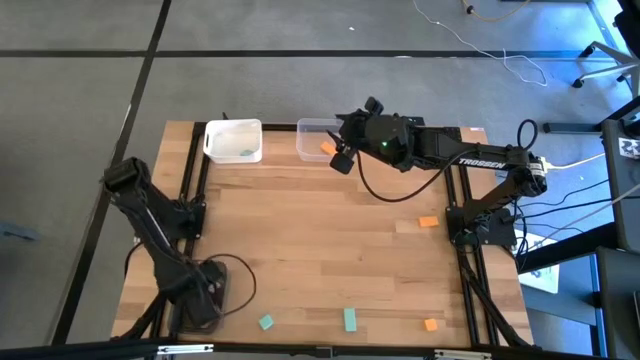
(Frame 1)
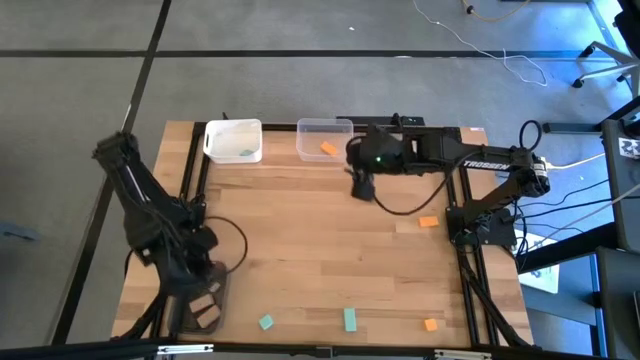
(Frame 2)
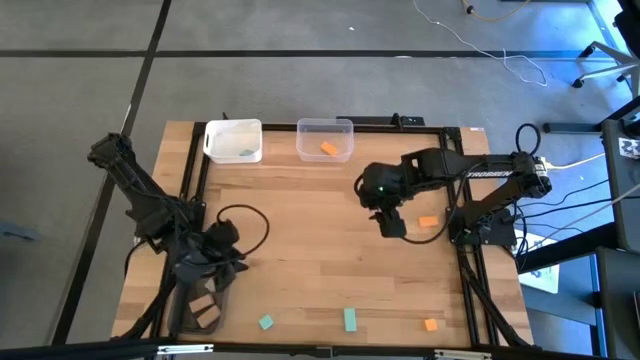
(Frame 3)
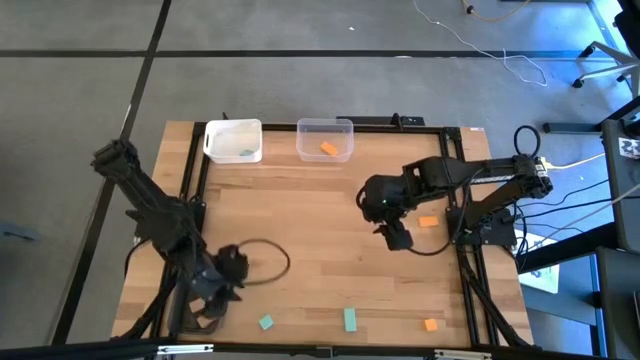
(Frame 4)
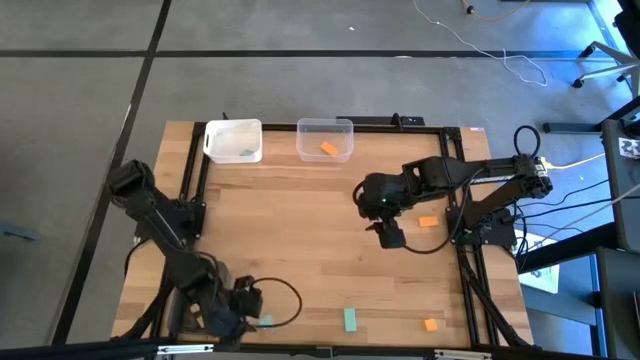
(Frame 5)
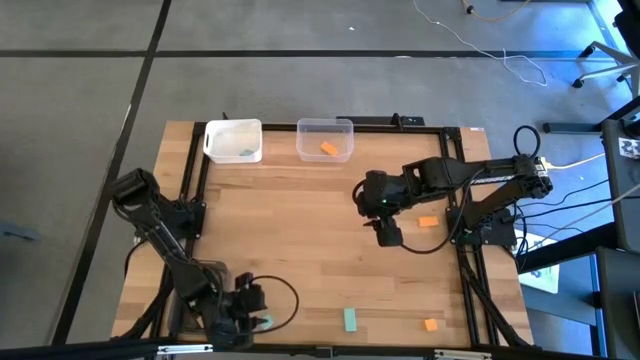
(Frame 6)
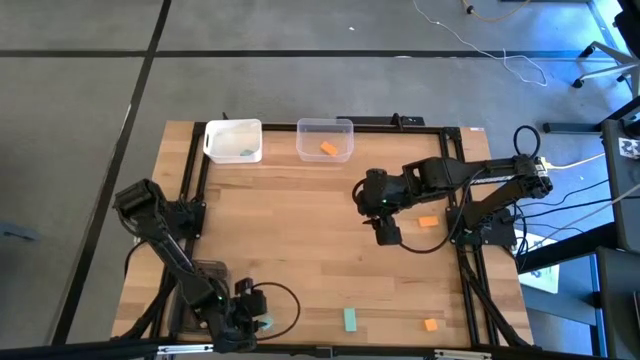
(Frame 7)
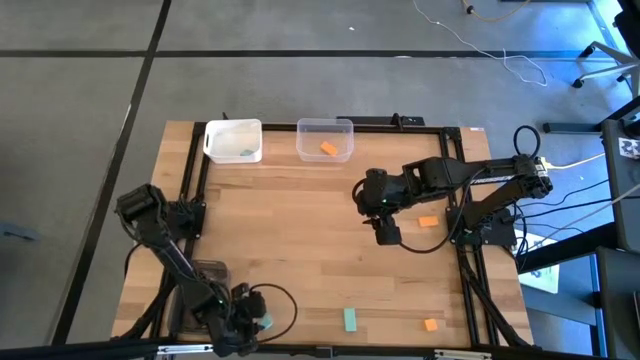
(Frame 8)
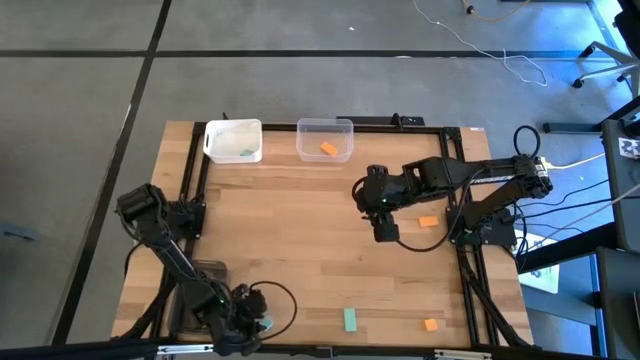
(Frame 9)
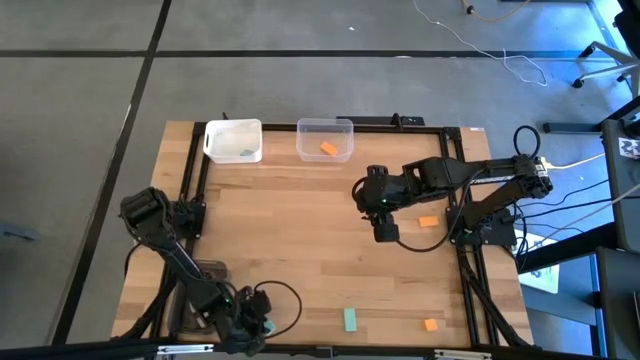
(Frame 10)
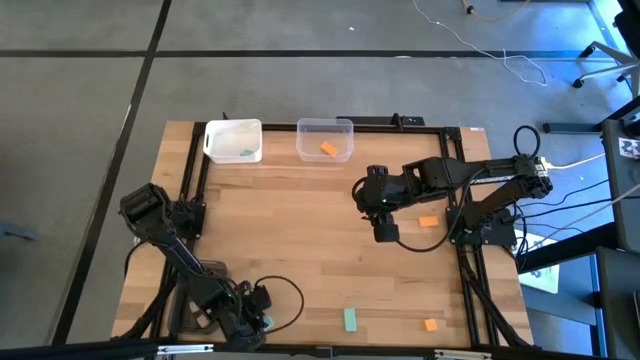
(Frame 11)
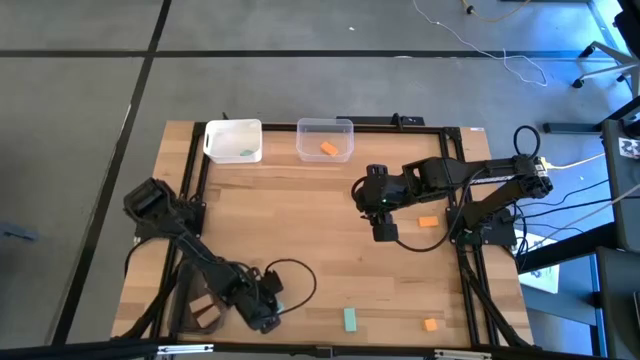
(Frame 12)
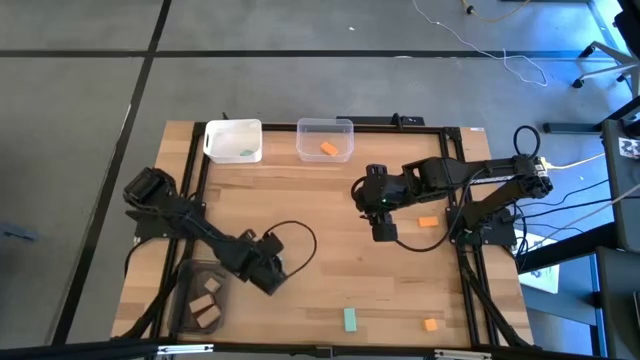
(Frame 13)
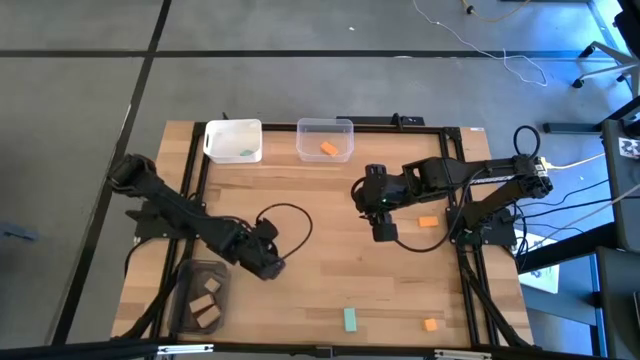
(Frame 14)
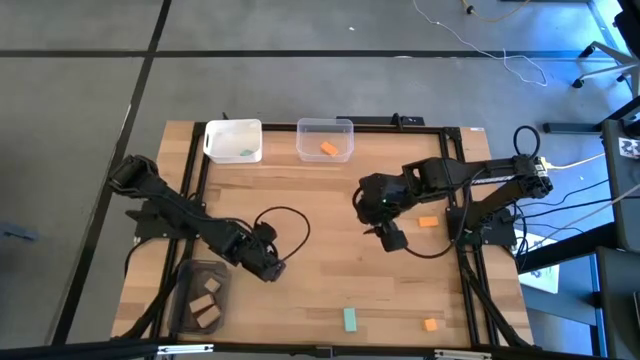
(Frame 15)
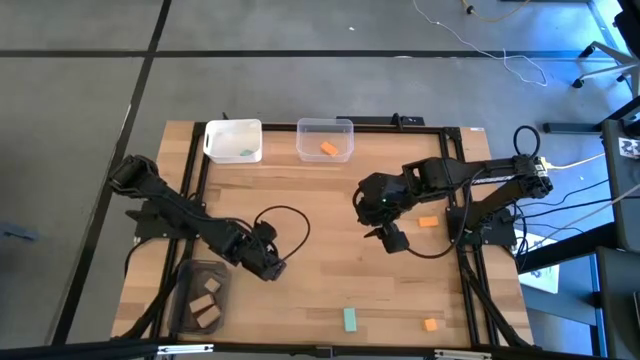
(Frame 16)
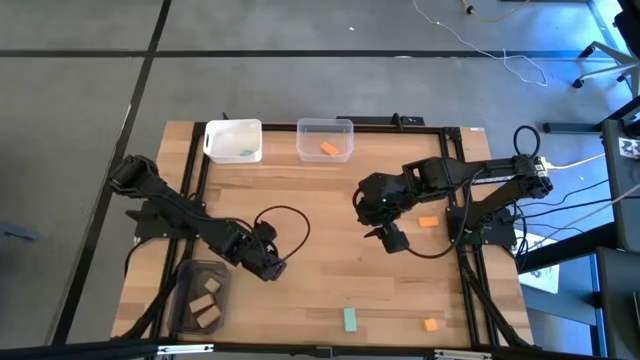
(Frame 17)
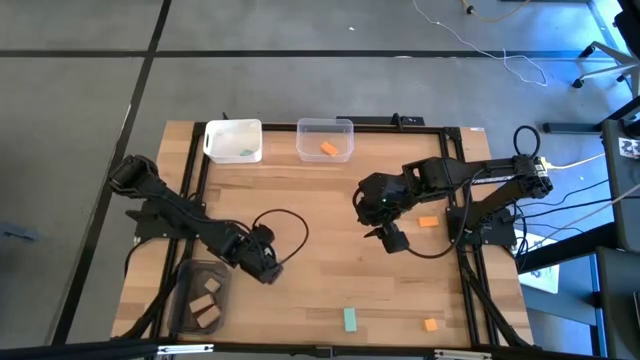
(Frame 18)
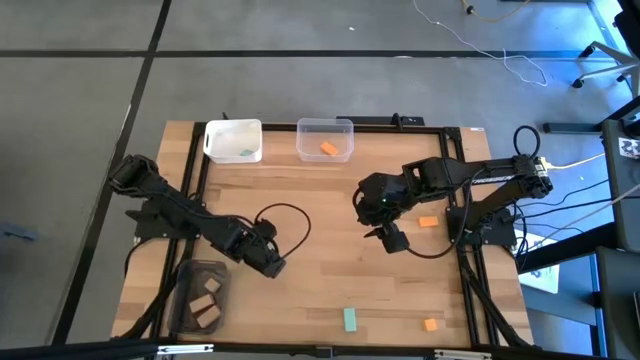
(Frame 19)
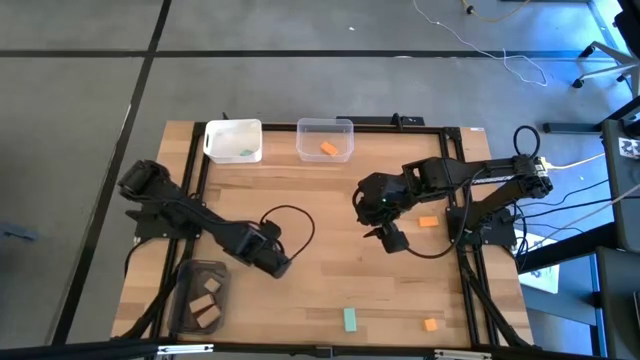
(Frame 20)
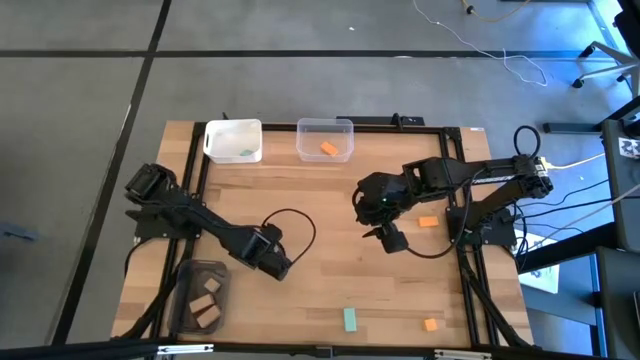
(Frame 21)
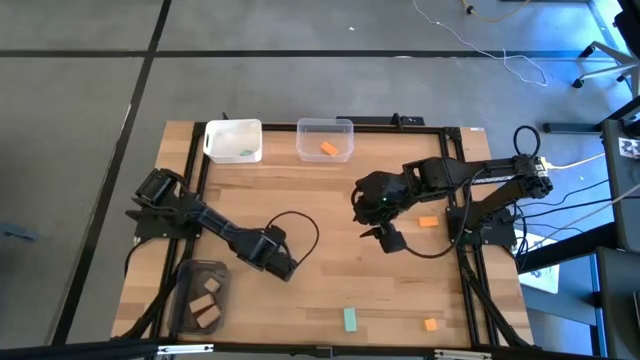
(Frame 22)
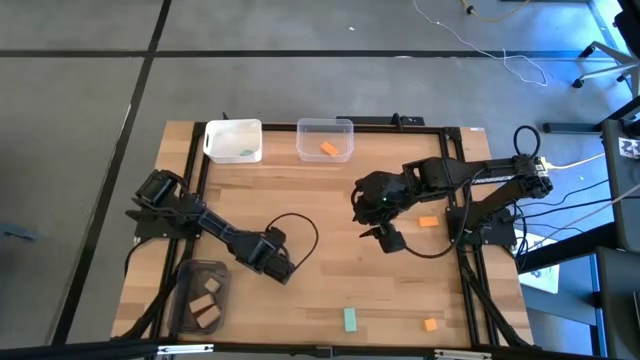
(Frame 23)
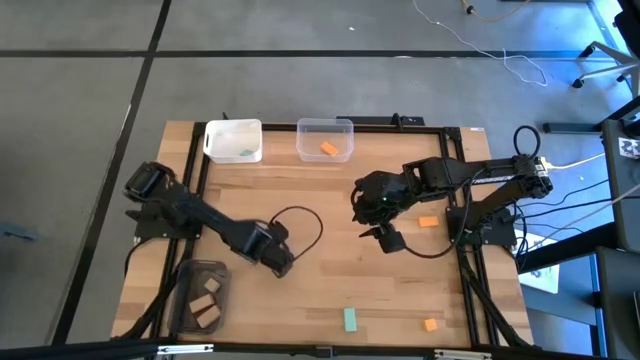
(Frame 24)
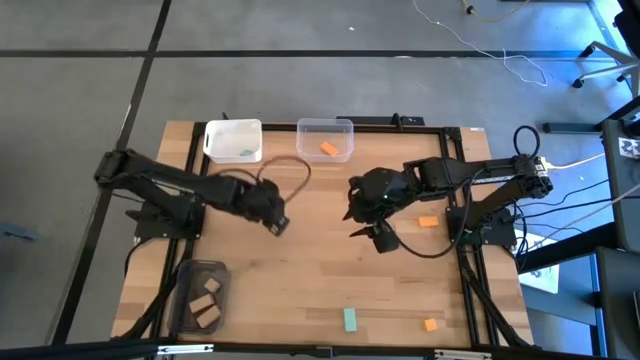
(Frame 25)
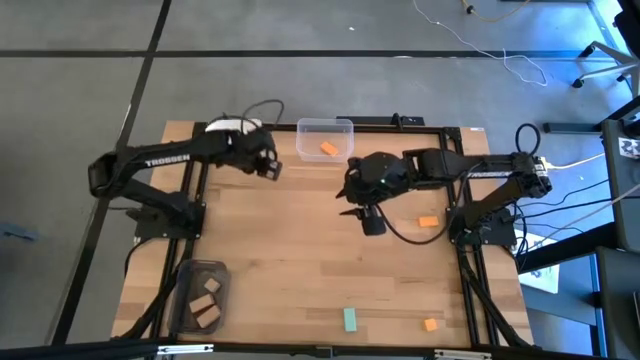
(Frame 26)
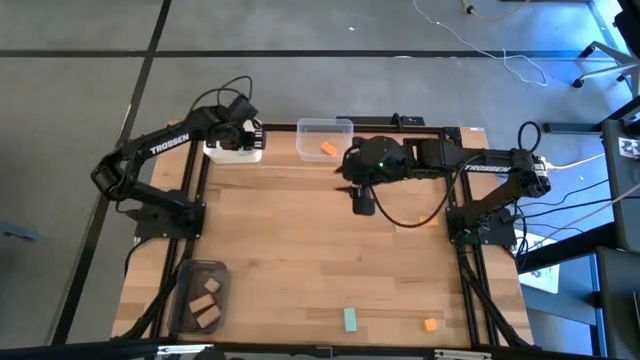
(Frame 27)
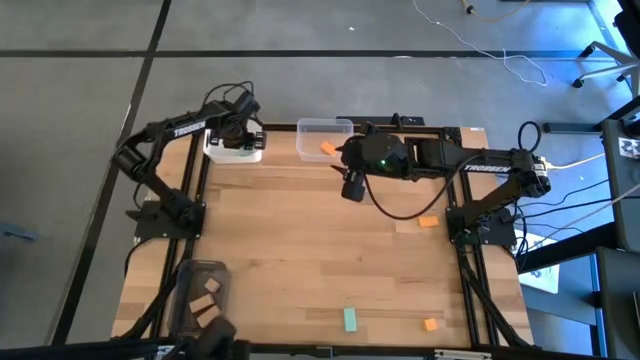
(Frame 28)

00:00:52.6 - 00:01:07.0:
Task: Sort & place blocks by color
Put the left blue block into the white bin

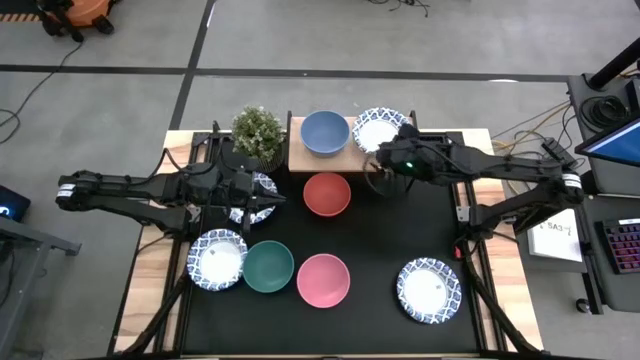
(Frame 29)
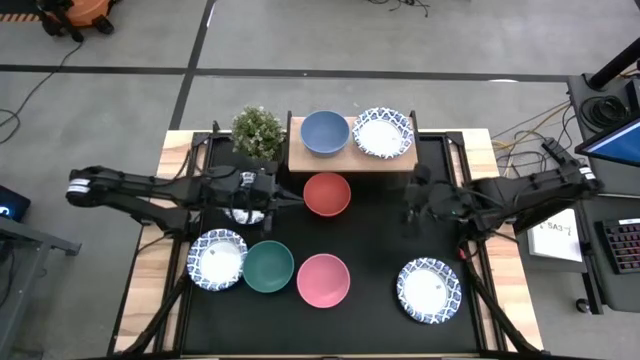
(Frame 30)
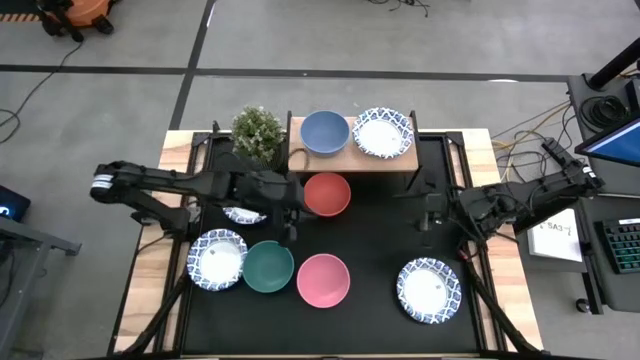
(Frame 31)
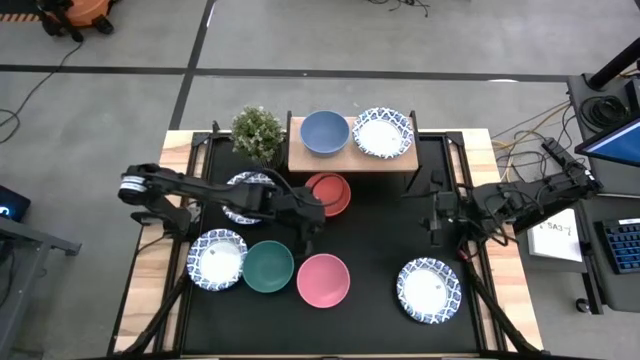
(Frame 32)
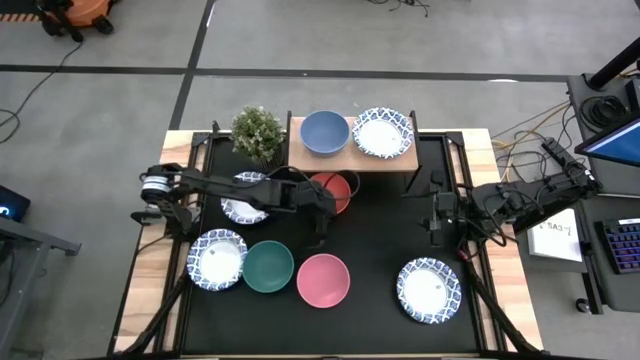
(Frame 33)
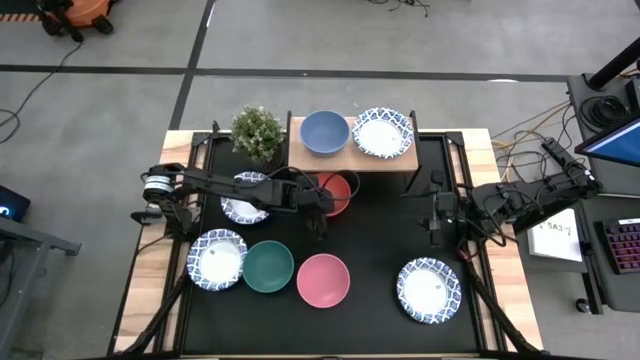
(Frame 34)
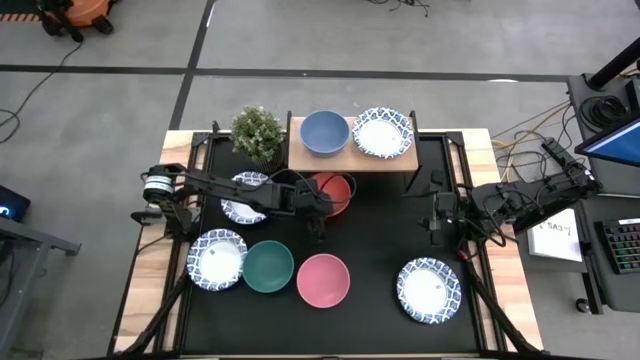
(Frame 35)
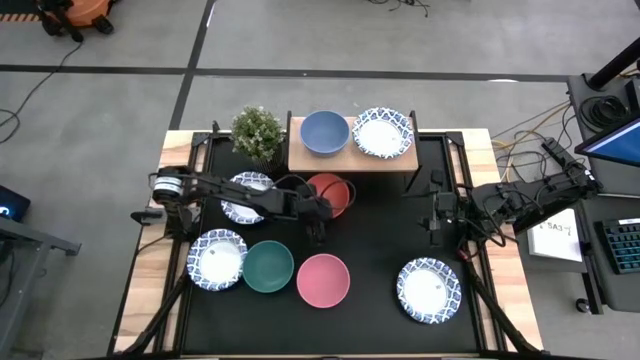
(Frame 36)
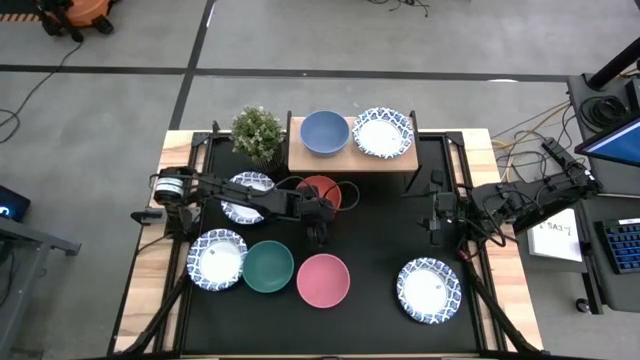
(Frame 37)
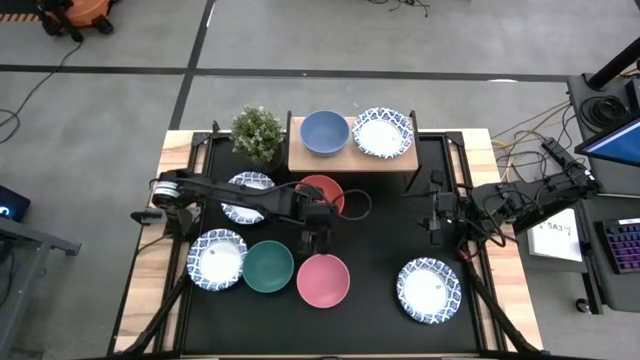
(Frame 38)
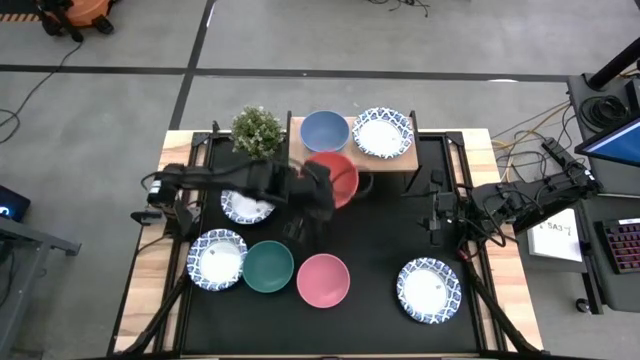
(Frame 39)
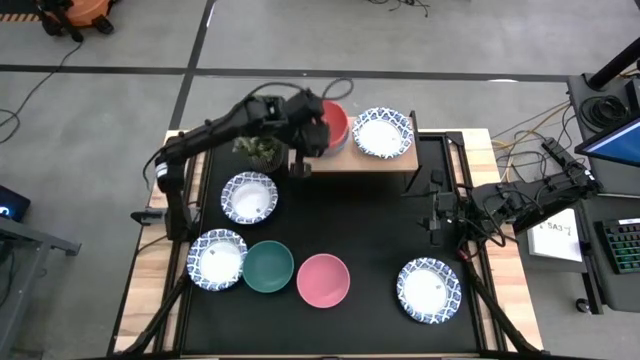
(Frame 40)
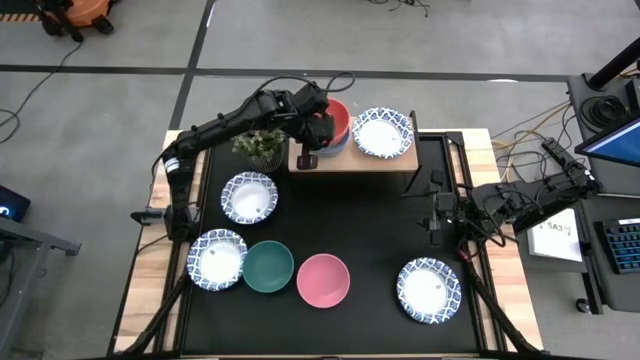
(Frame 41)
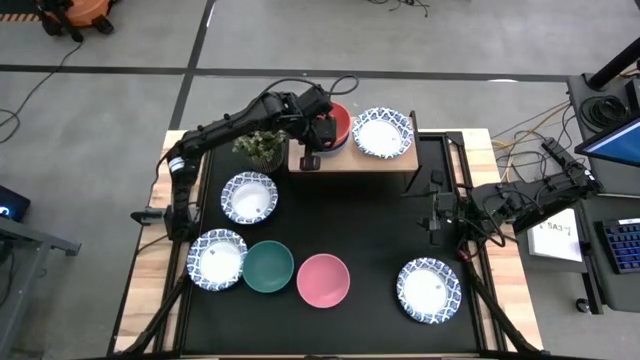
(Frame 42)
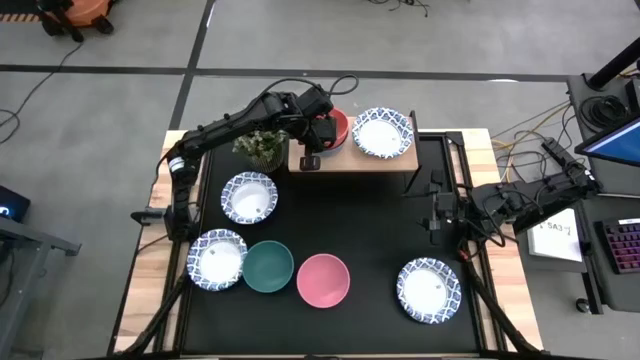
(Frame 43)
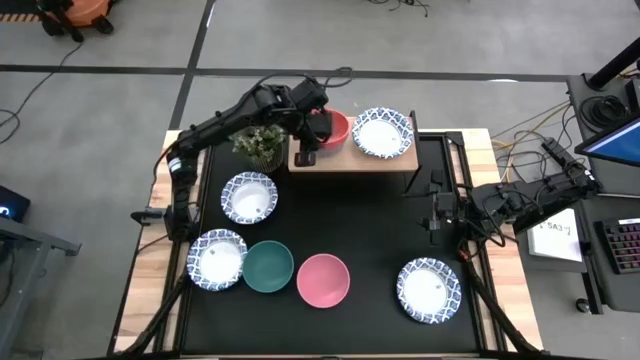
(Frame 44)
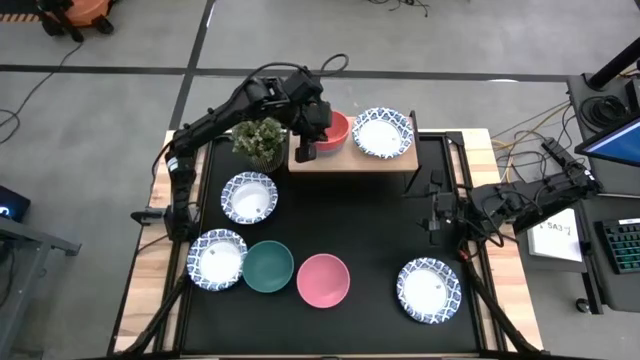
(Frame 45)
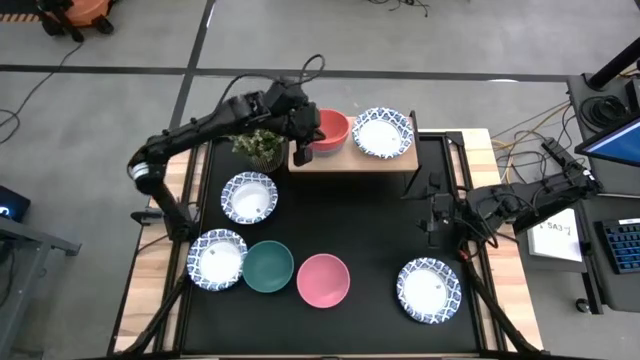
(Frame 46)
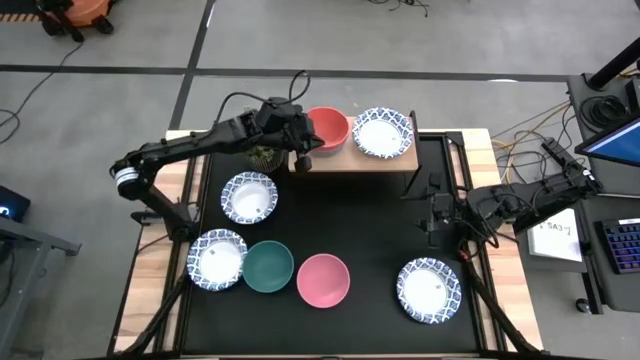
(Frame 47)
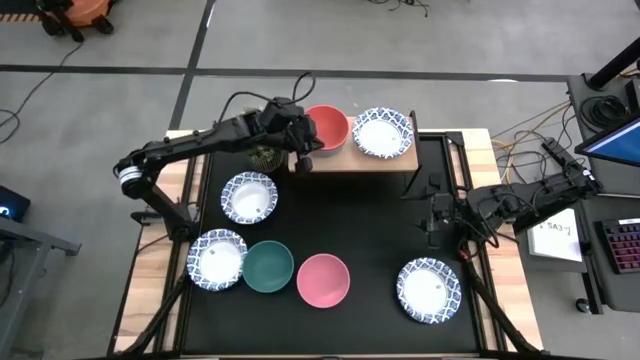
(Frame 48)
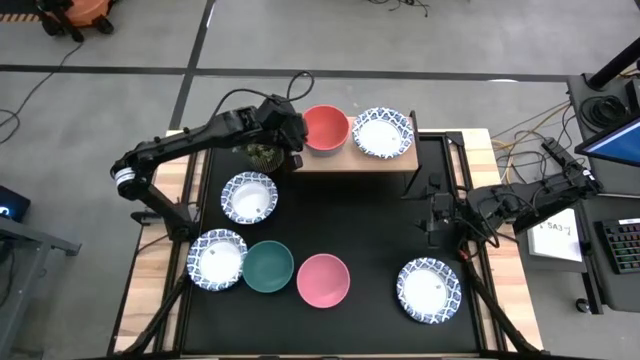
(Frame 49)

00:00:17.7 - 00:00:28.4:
Task: Place and stack bowls onto a shelf
Stack the orange bowl on top of the blue bowl
